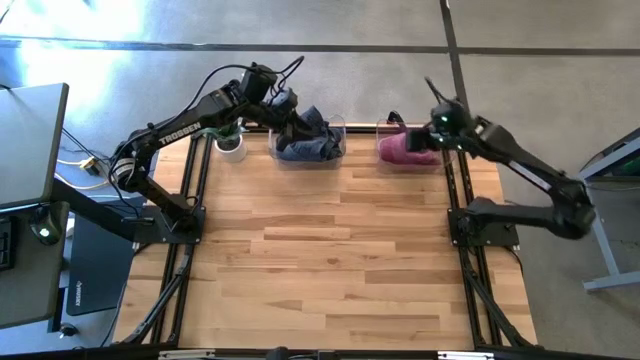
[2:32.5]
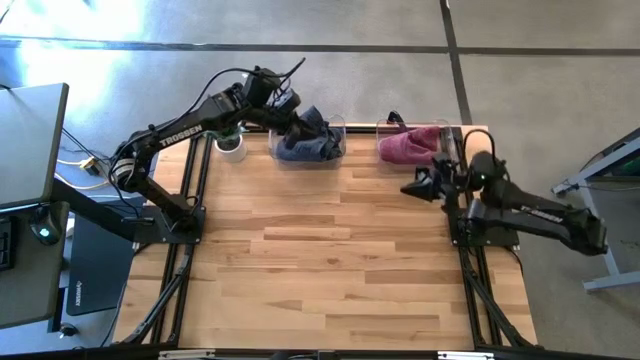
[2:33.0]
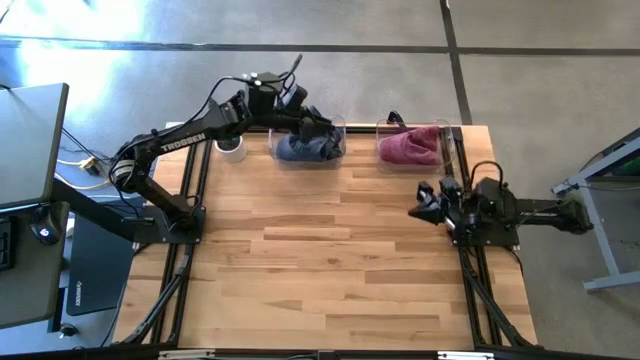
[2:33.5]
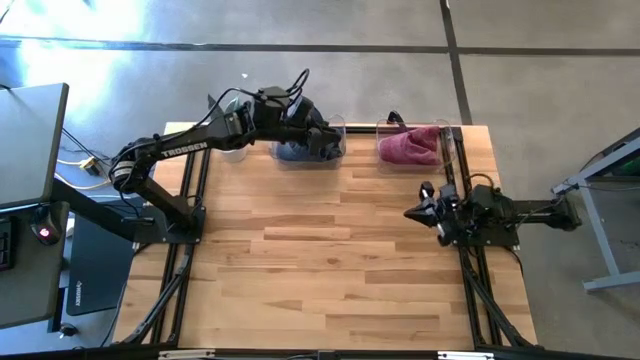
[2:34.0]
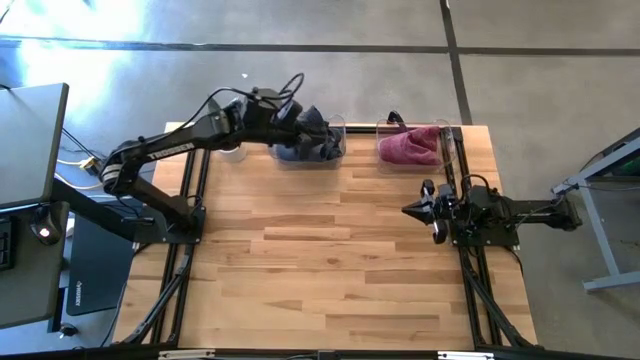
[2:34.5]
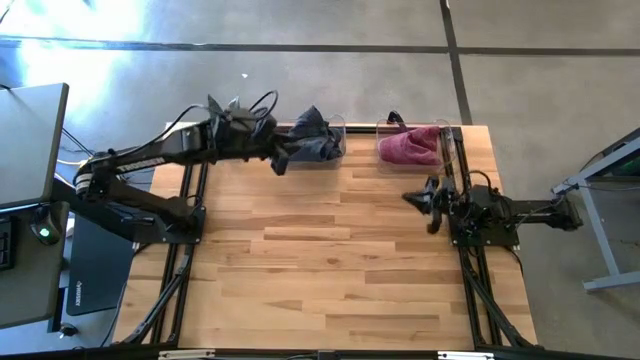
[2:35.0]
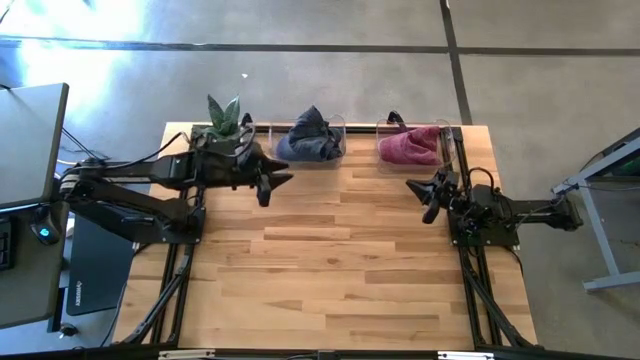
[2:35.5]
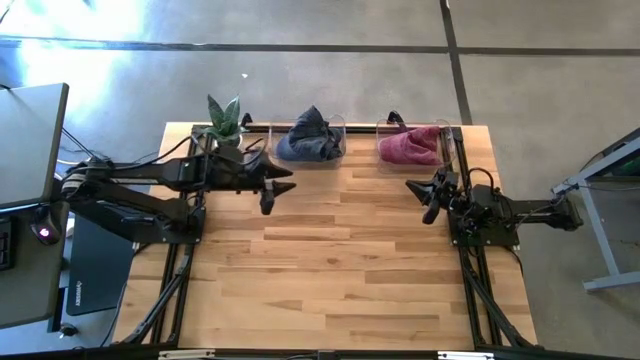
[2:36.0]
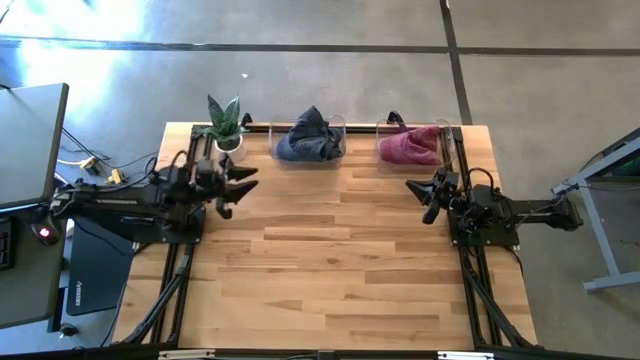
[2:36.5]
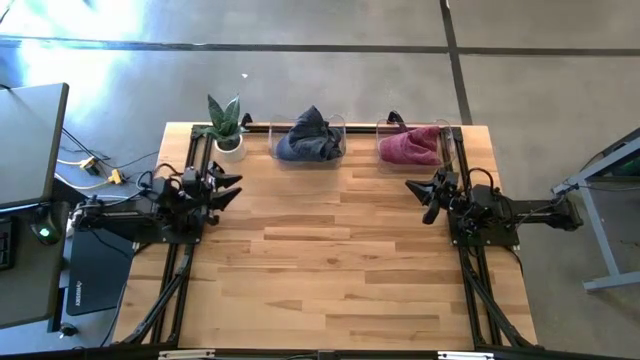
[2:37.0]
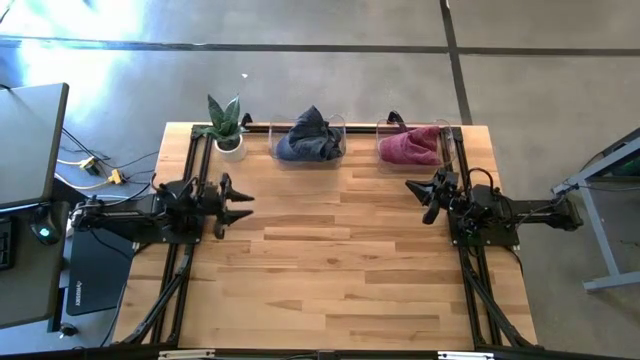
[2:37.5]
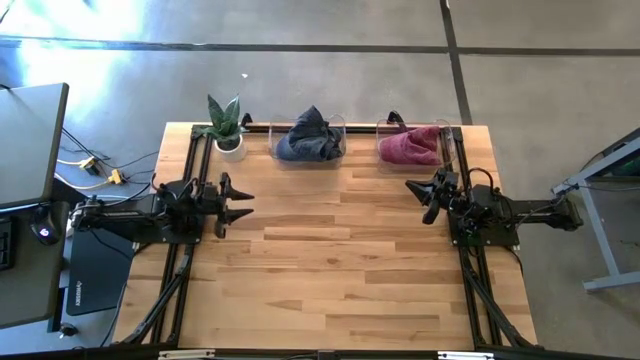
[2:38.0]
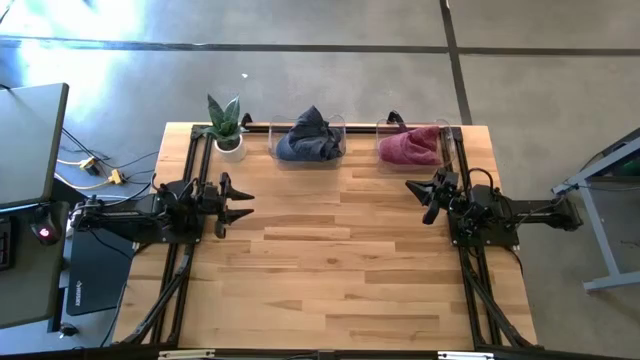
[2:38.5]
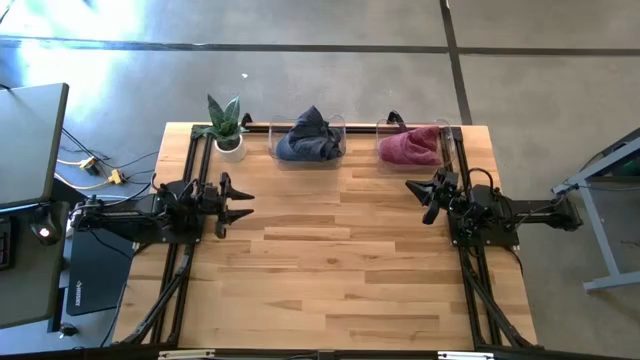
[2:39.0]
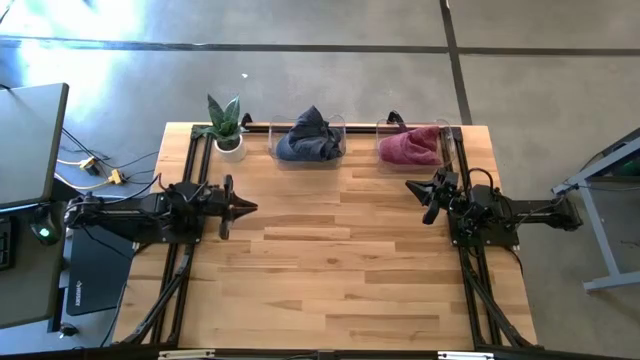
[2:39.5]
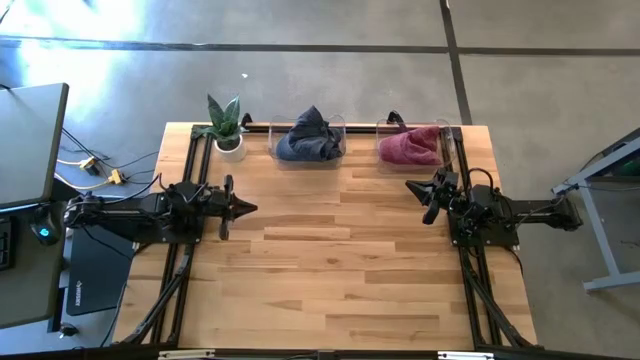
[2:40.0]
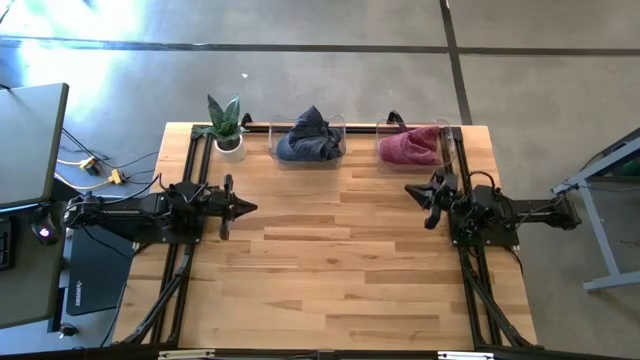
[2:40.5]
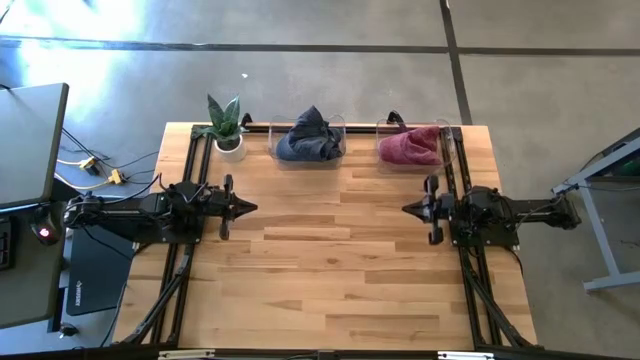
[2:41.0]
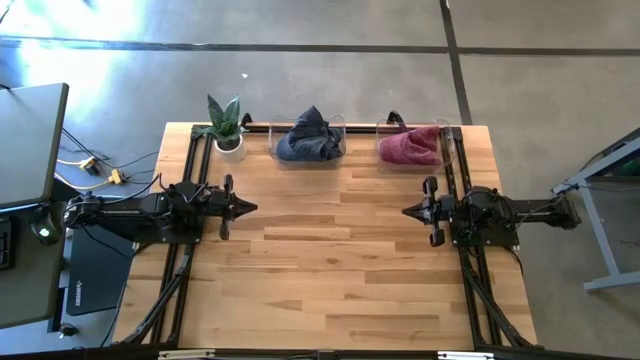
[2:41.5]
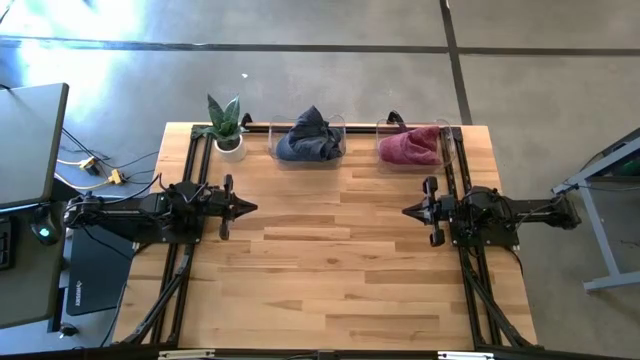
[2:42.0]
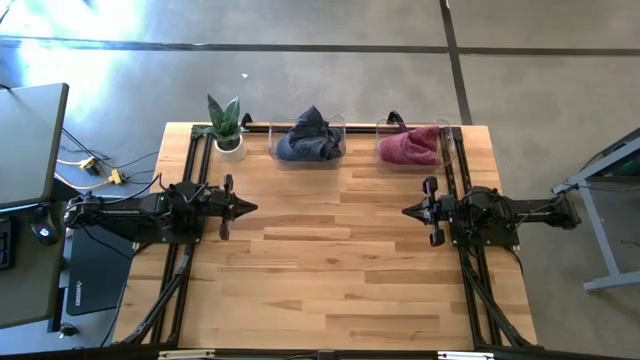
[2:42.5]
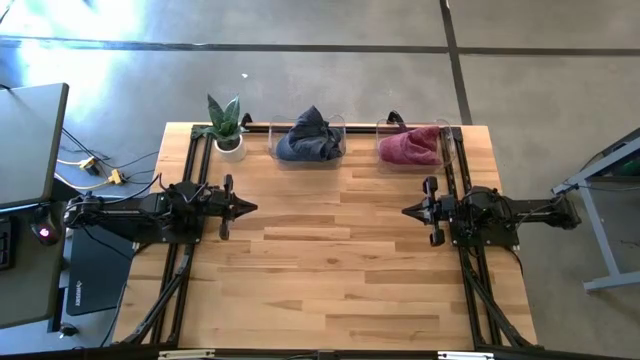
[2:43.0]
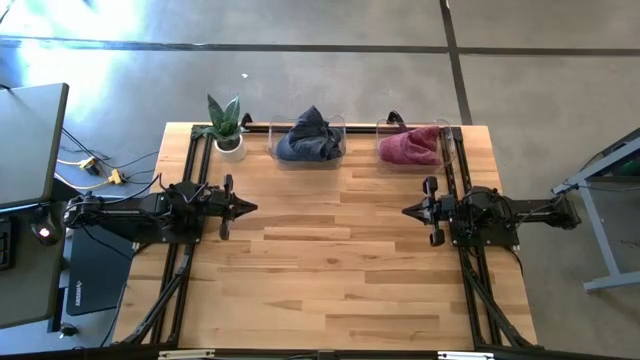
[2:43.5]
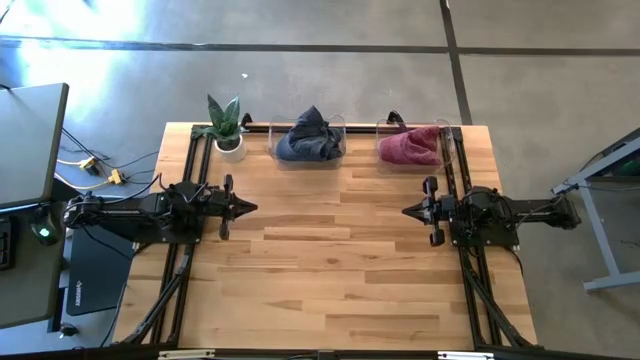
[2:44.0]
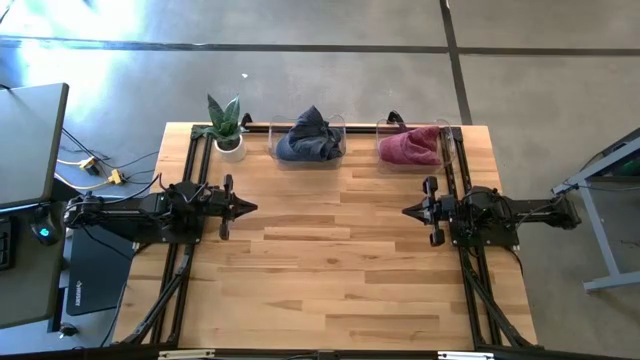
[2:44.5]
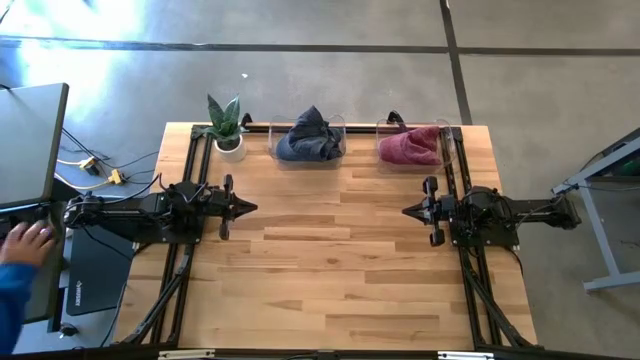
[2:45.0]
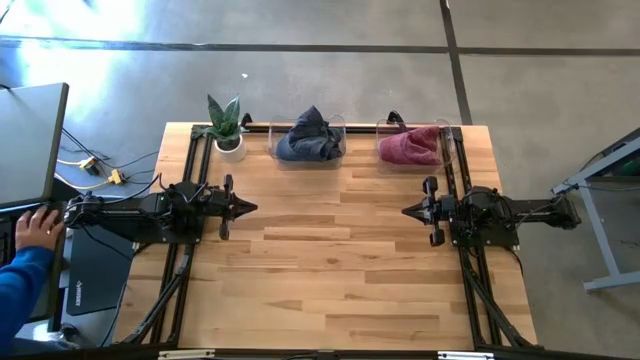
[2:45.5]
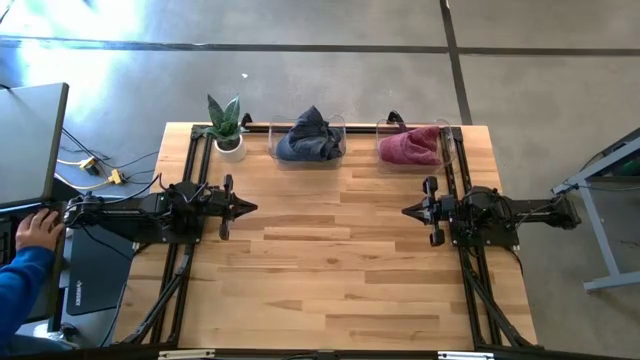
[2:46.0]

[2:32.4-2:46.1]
Task: Pick & Place hat
Return to Home Position

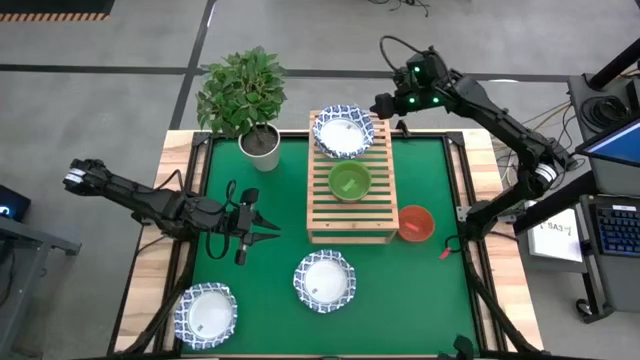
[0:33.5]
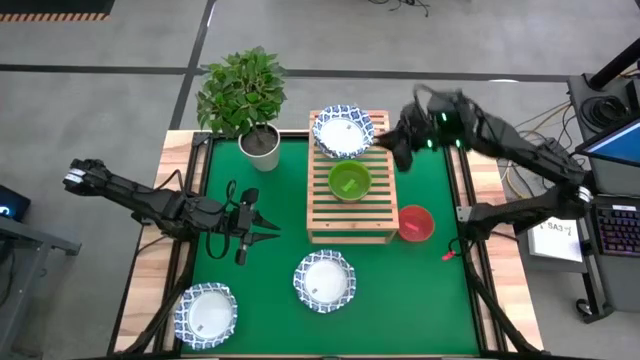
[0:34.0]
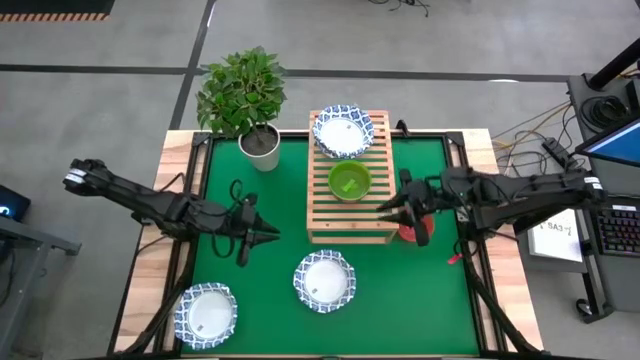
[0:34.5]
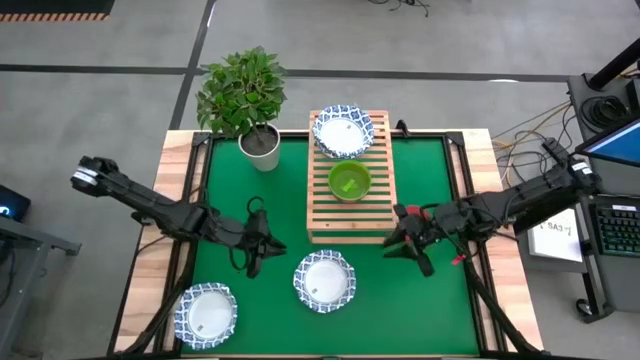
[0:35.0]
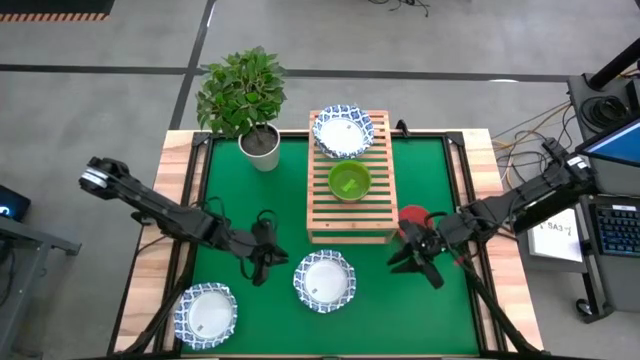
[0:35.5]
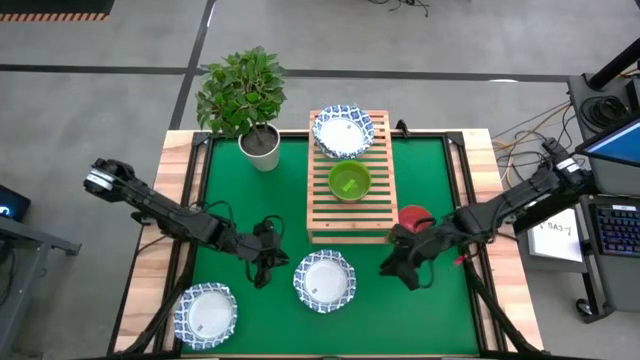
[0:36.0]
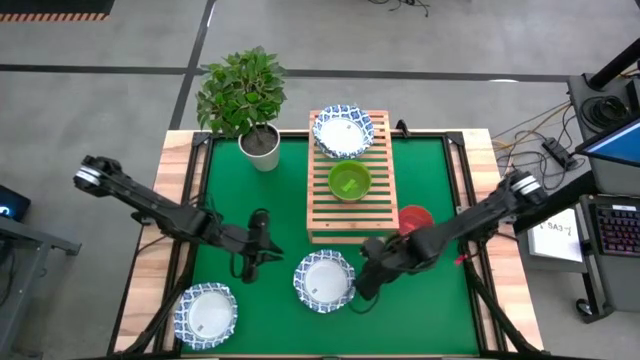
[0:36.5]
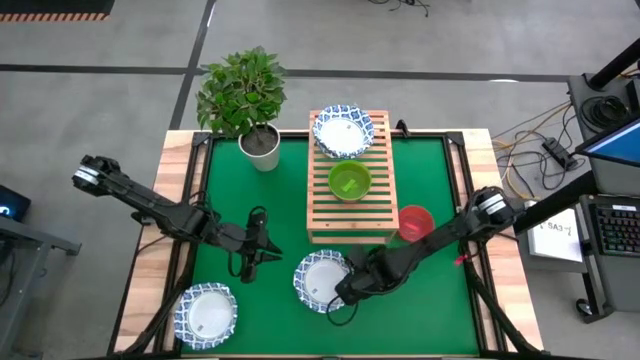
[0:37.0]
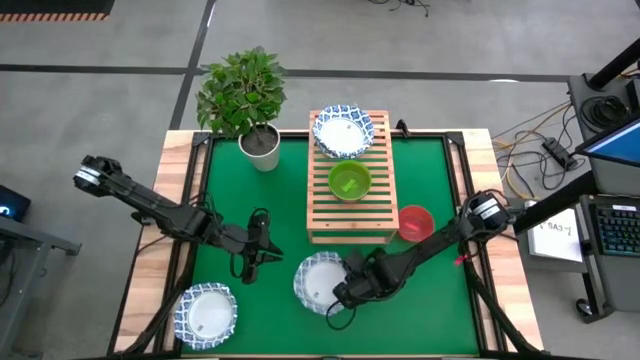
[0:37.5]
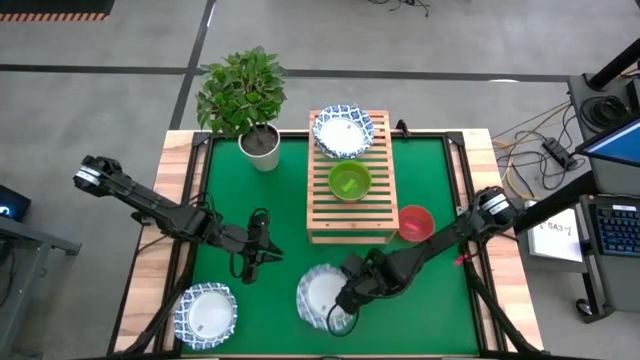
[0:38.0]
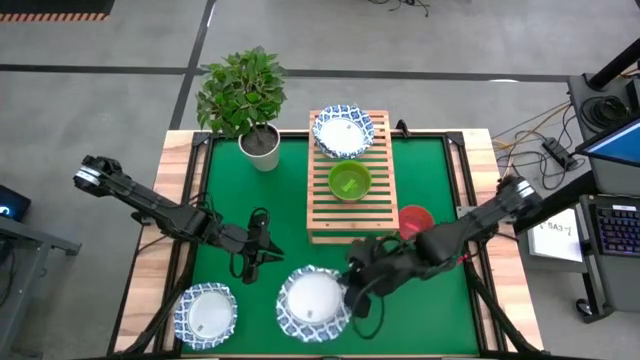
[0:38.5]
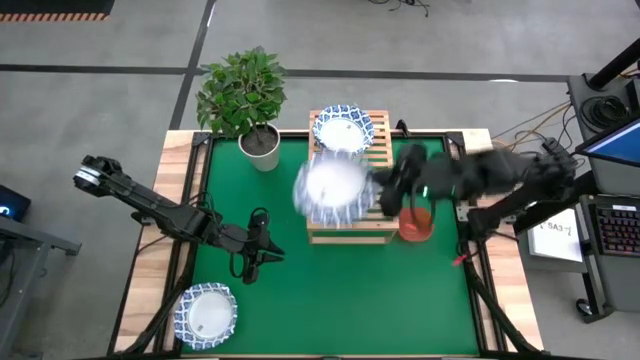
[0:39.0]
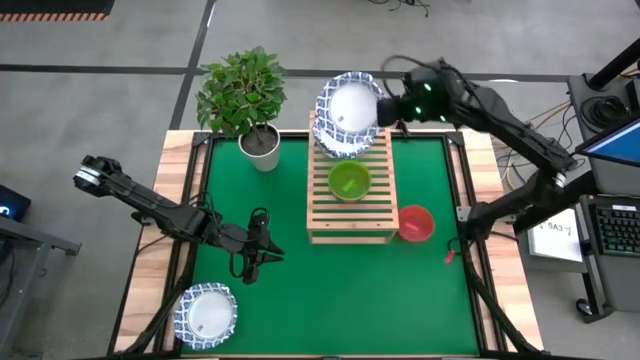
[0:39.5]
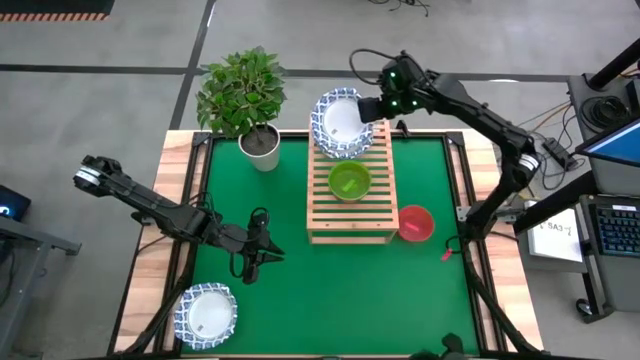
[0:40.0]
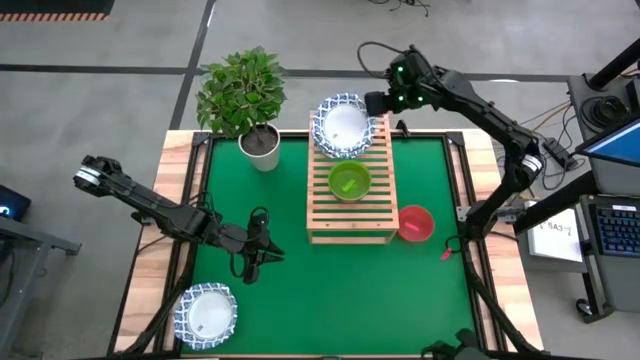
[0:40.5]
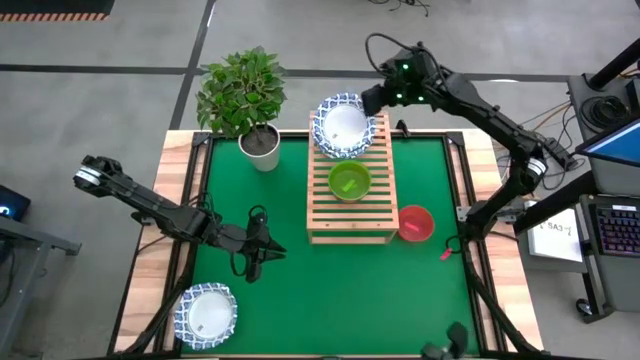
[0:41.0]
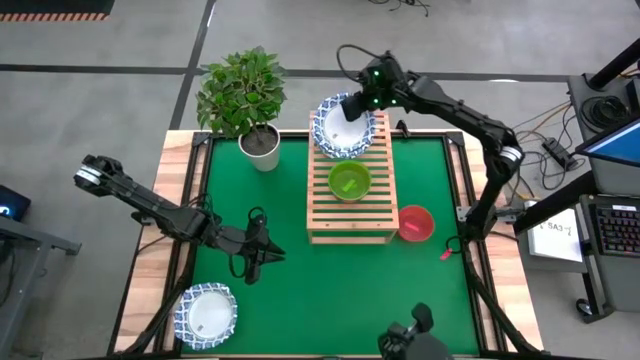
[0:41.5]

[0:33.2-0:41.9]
Task: Place and stack bowls onto a shelf
Stack the white patterned bowl on top of the other white patterned bowl on the shelf

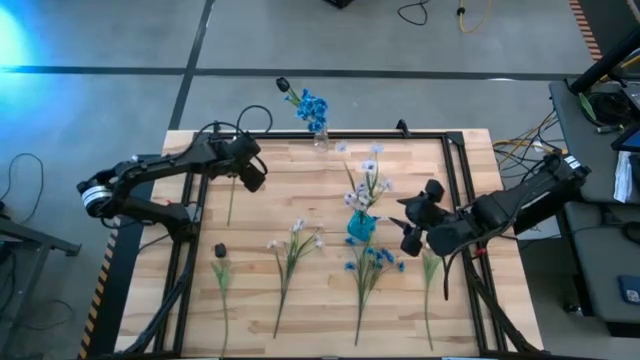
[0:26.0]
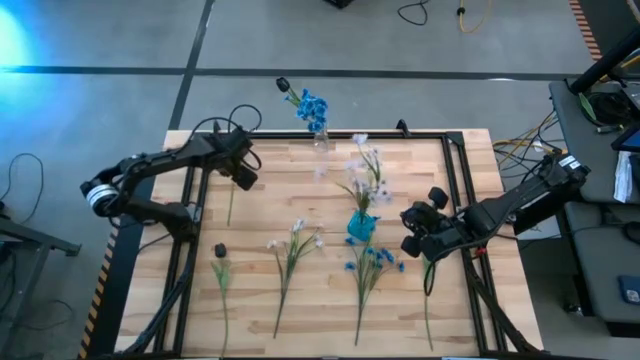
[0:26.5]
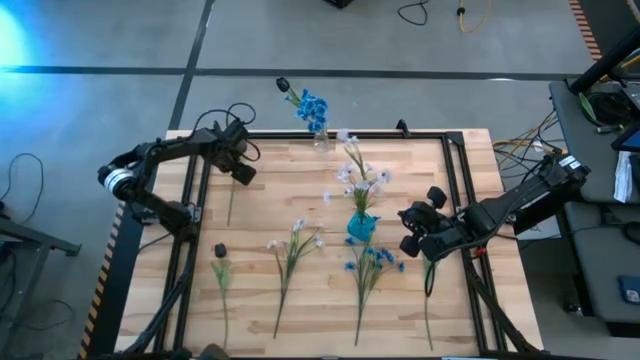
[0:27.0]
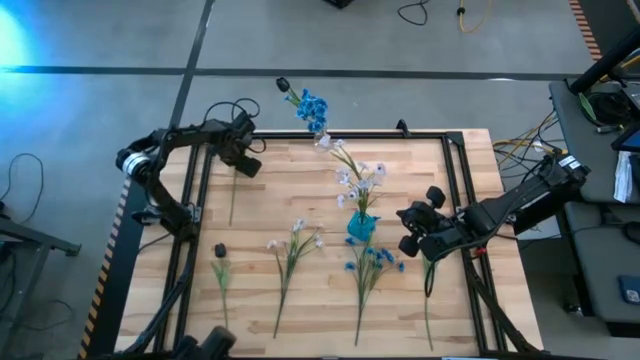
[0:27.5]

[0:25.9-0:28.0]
Task: Sort flowers into vase by color
Put the top white tulip into the blue vase
